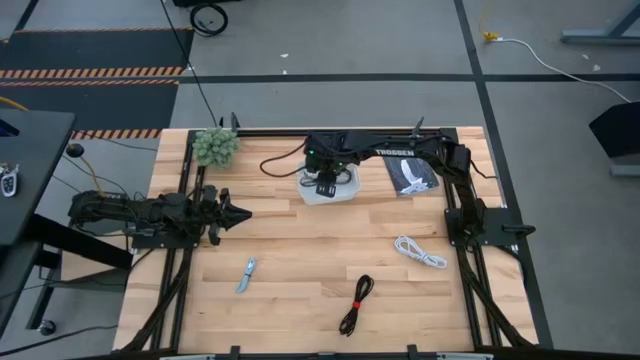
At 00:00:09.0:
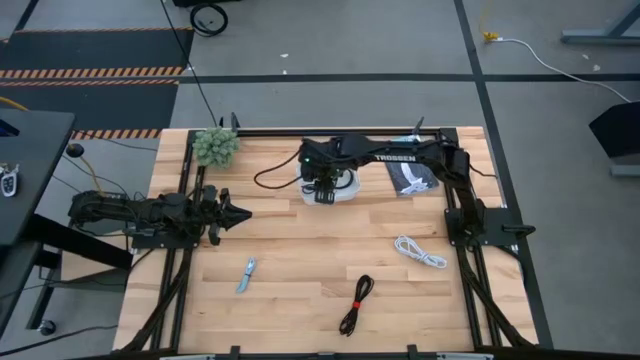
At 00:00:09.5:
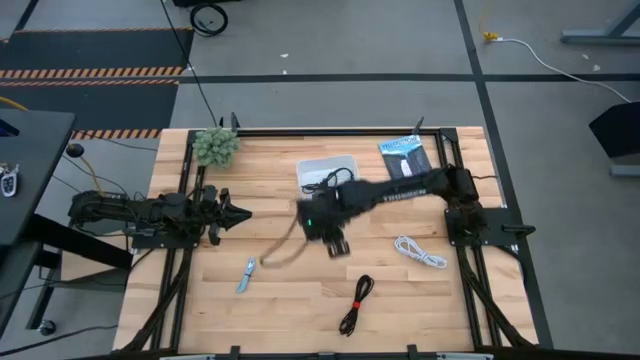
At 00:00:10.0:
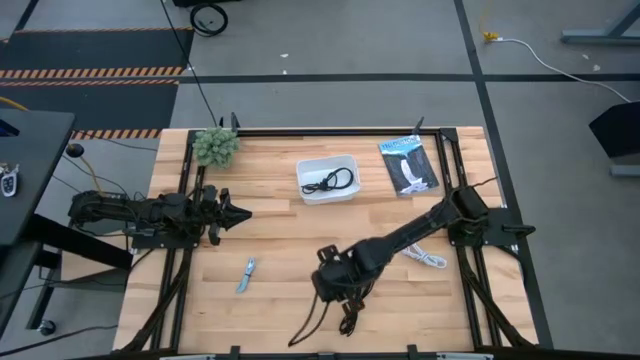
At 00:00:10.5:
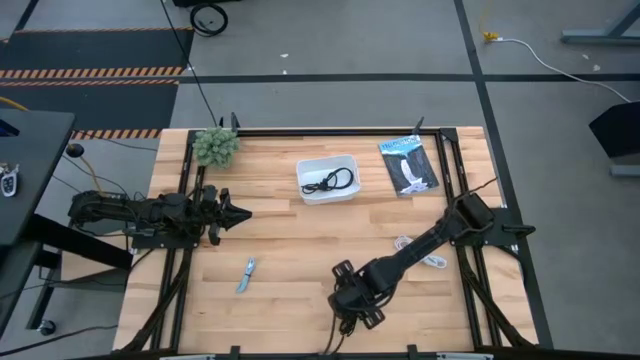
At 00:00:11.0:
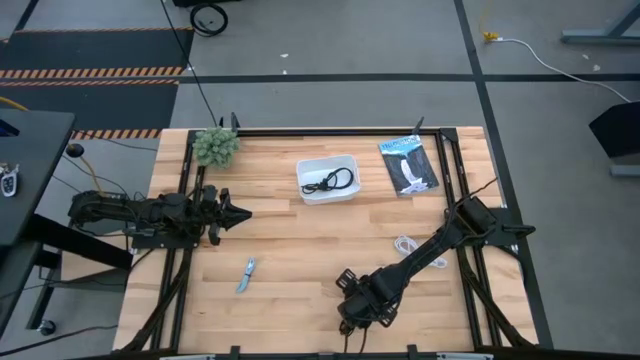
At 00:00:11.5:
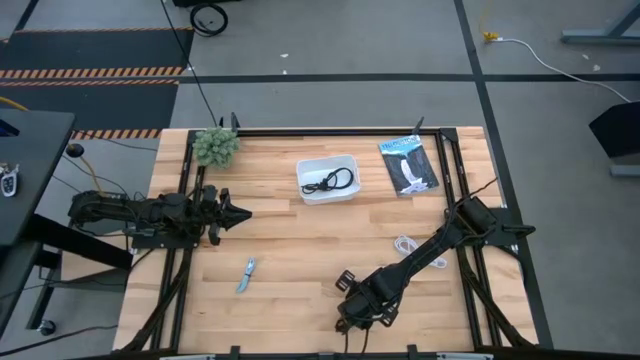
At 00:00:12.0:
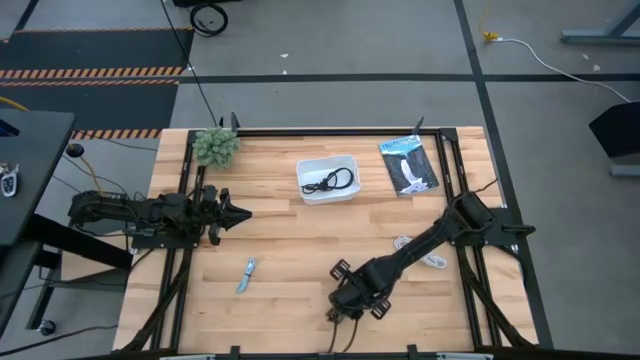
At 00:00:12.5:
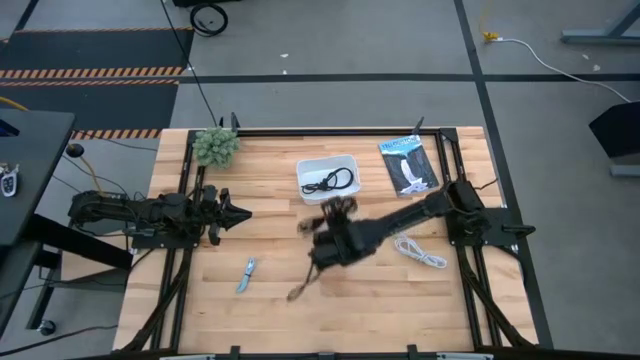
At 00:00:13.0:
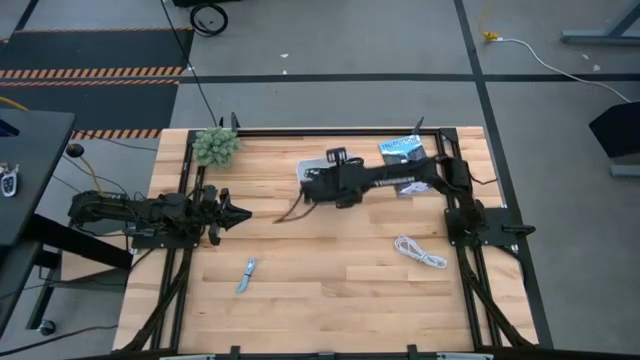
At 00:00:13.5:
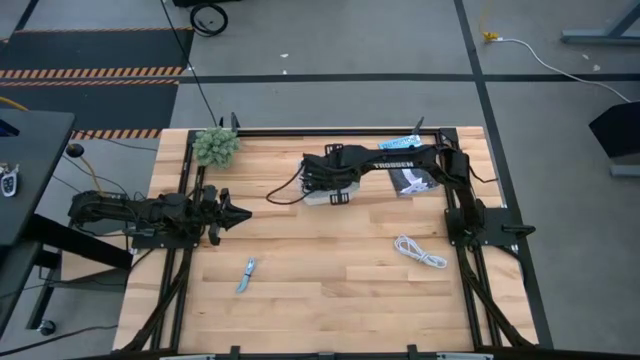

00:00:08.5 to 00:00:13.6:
Task: Pick and place USB-C Cables
Put the black charger cable into the bin

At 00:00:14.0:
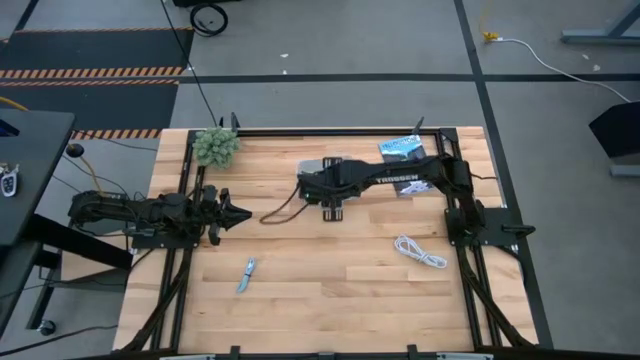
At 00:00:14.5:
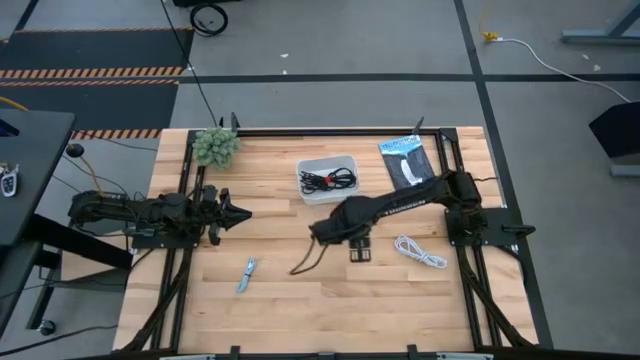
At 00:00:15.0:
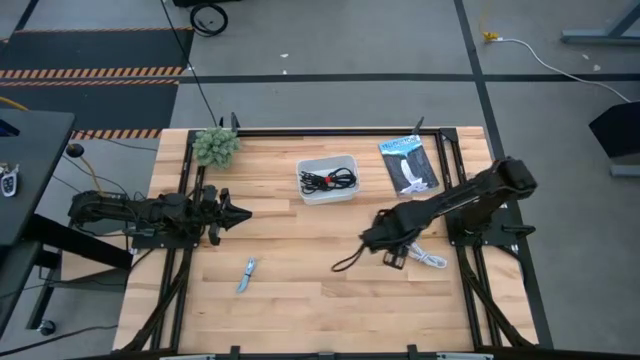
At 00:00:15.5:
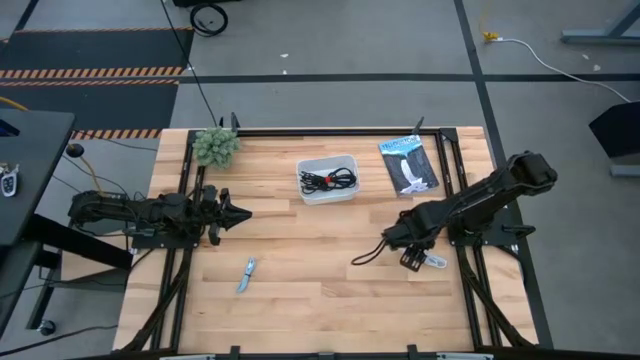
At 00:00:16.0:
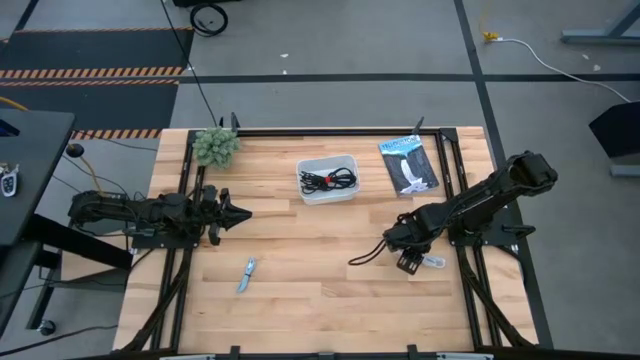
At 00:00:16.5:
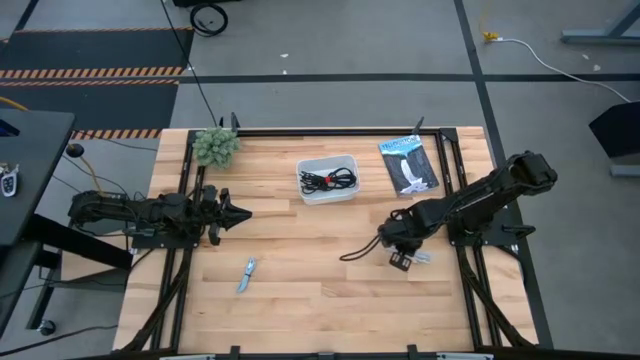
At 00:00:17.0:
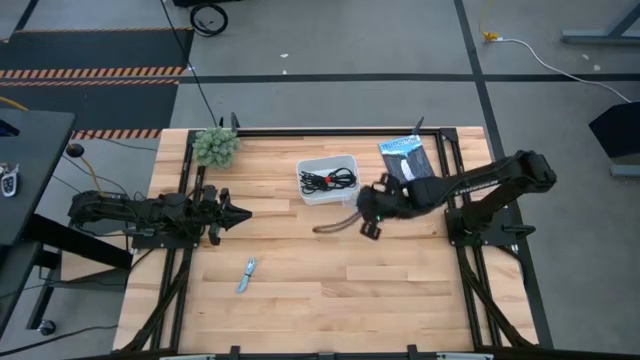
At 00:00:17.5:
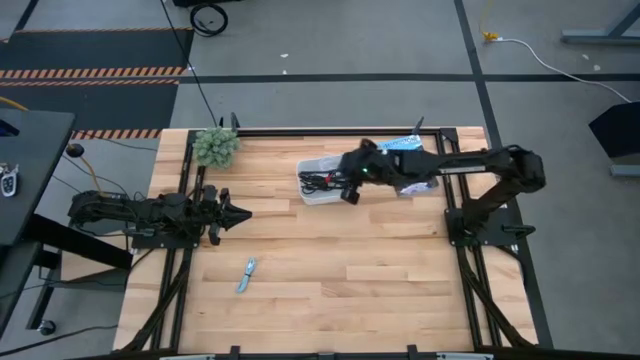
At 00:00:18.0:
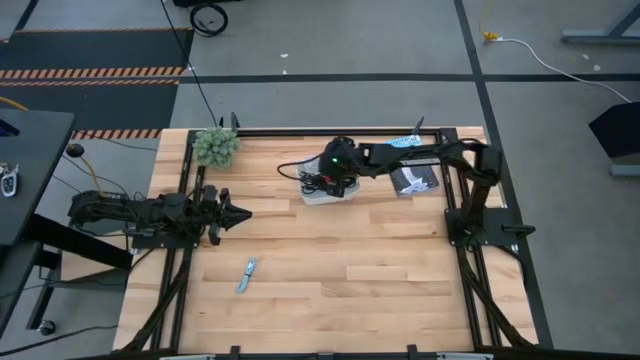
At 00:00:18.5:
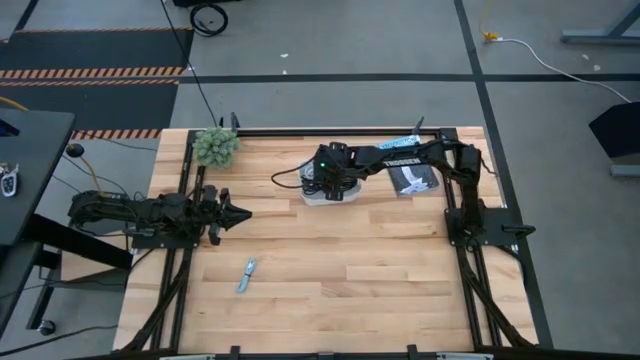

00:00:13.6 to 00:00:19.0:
Put the white charger cable into the bin

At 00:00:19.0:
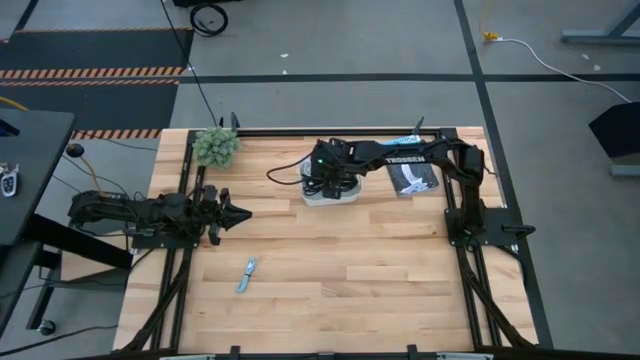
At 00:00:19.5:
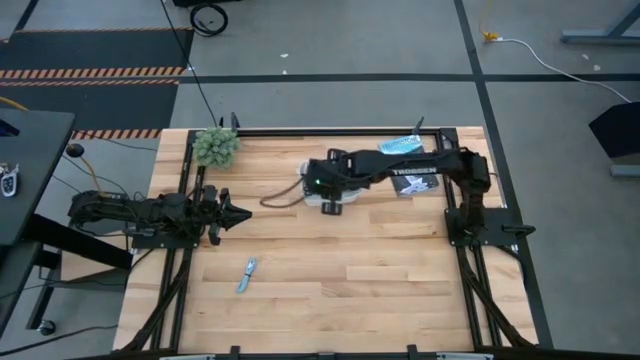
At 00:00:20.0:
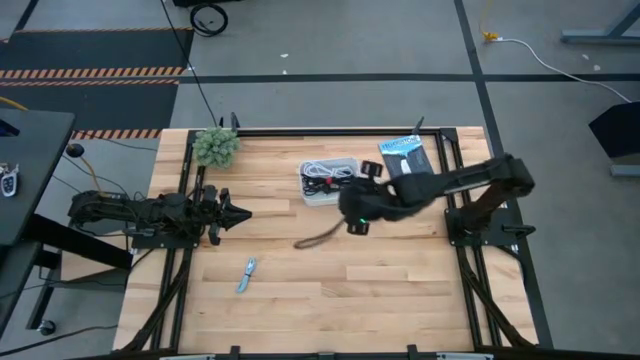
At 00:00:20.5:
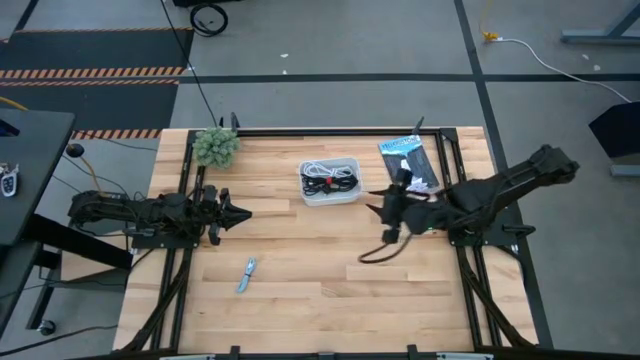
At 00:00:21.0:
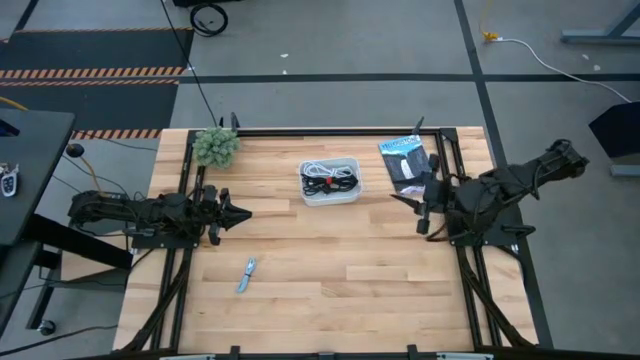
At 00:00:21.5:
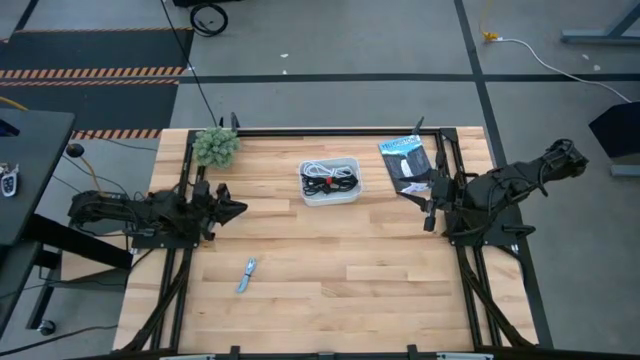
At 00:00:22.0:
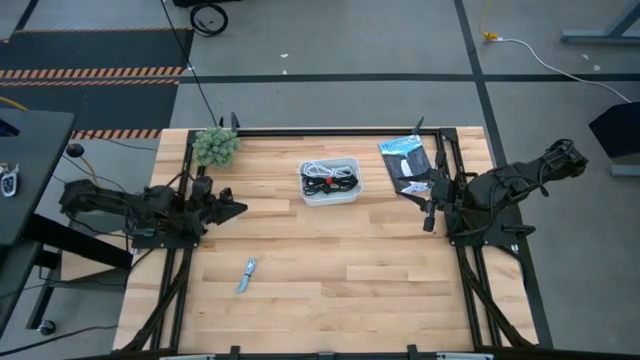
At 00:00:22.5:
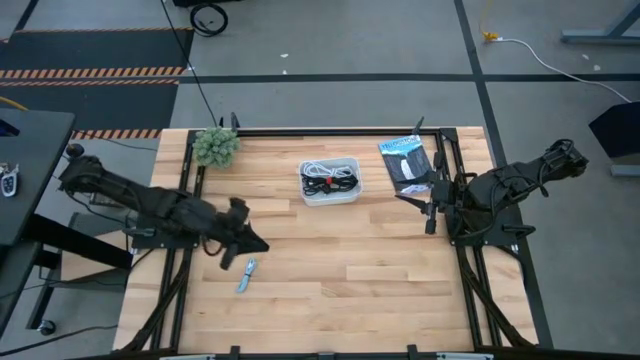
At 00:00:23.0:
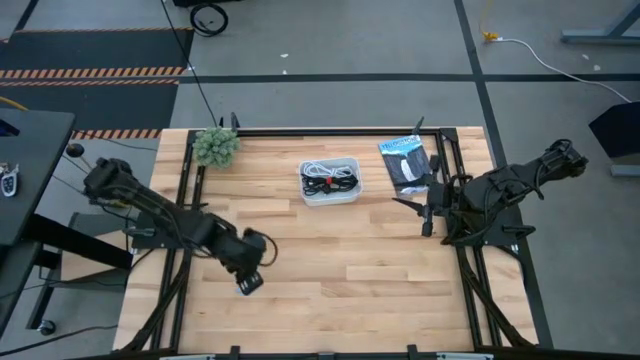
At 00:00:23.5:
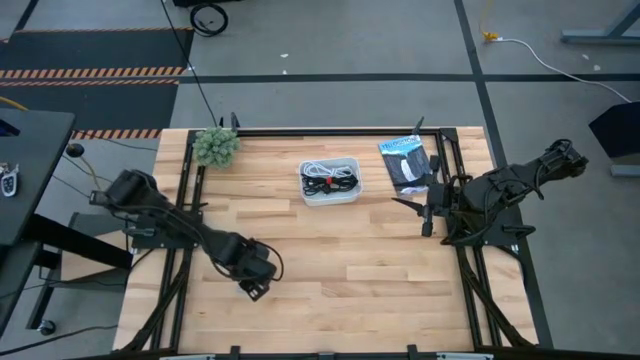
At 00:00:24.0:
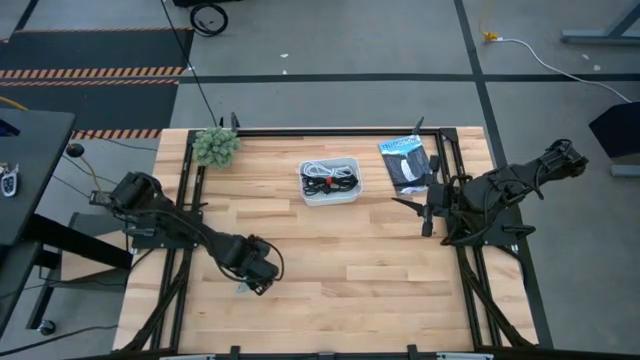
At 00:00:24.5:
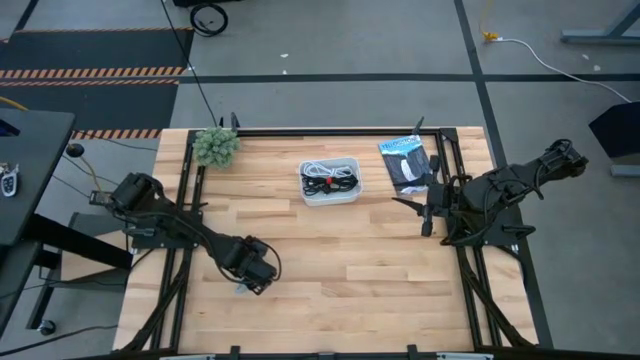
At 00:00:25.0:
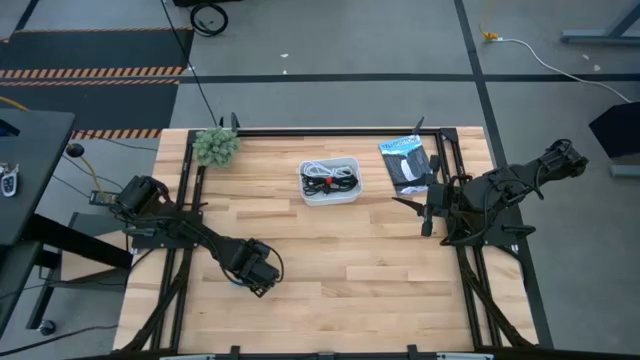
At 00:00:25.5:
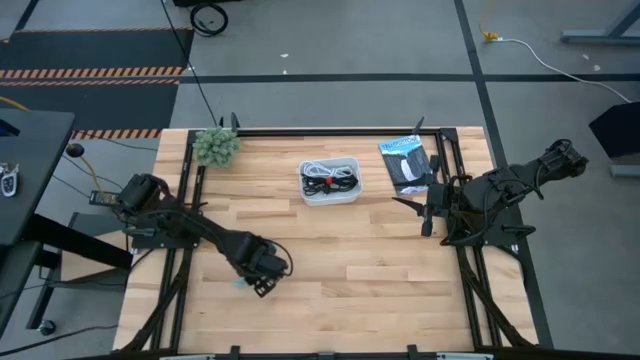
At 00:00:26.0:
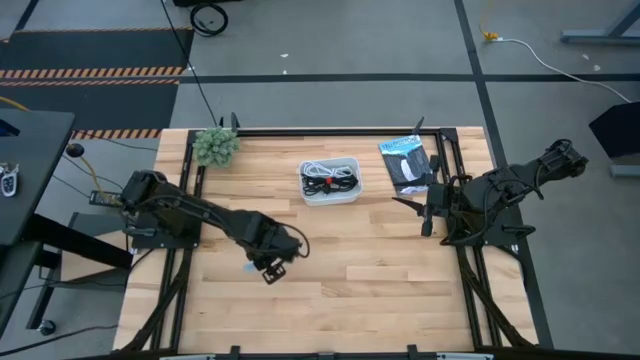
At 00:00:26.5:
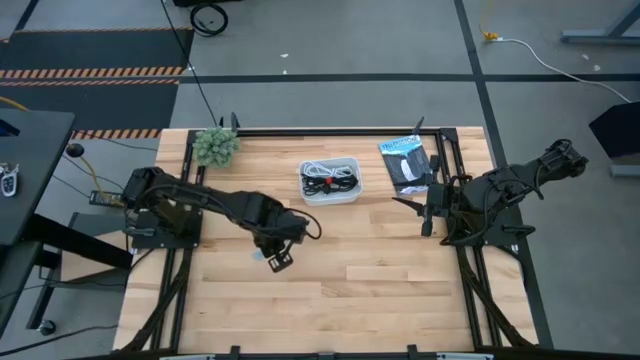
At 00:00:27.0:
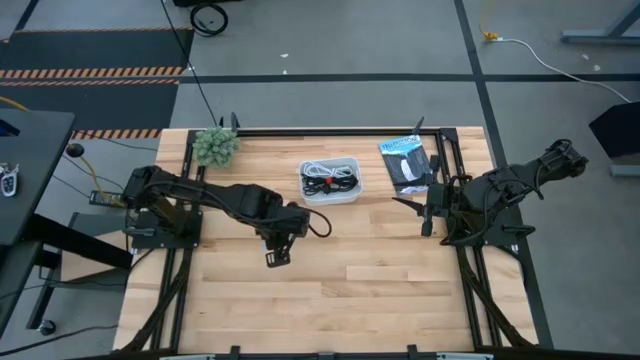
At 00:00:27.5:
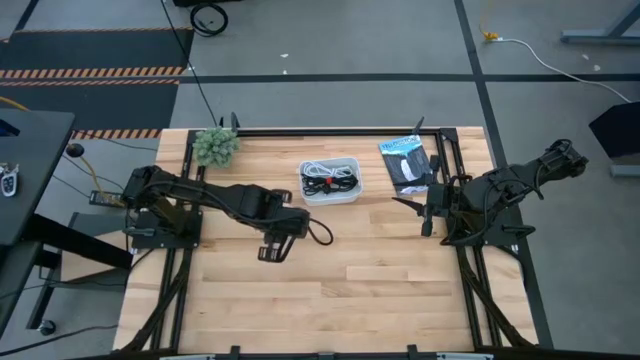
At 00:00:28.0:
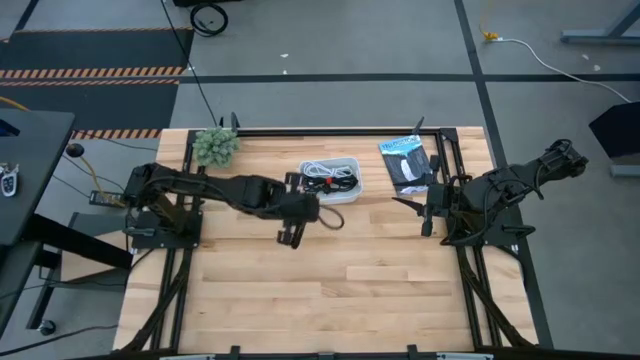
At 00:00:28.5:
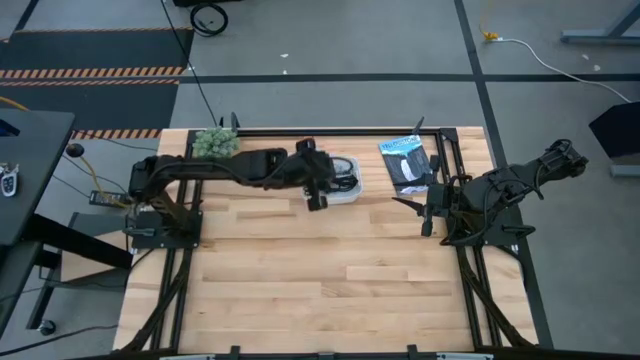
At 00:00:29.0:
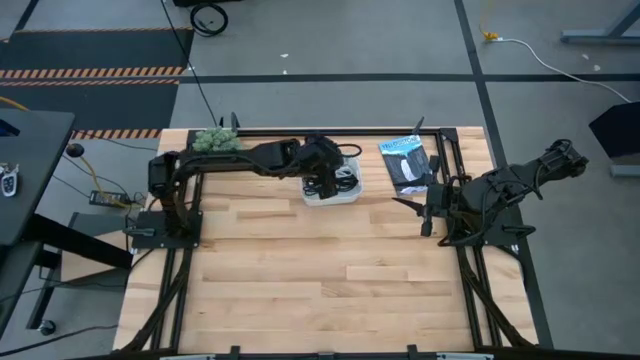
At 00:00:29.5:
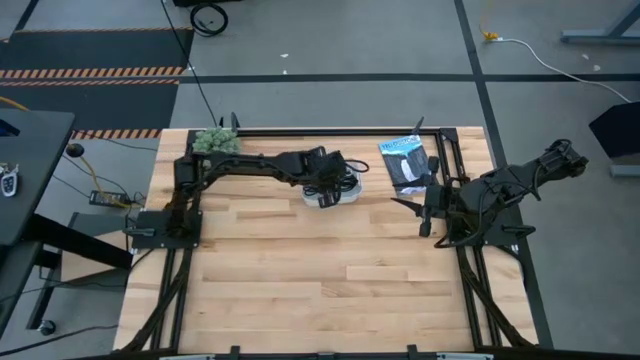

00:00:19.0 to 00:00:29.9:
Put the blue charger cable into the bin
